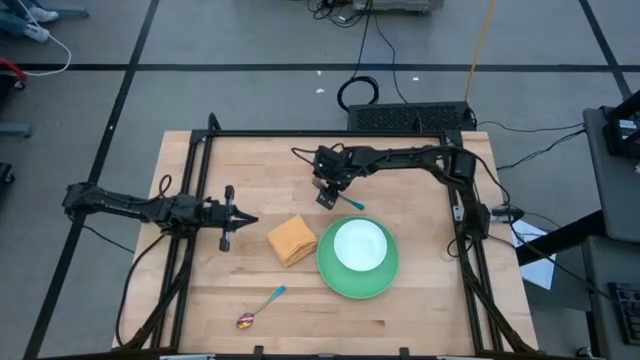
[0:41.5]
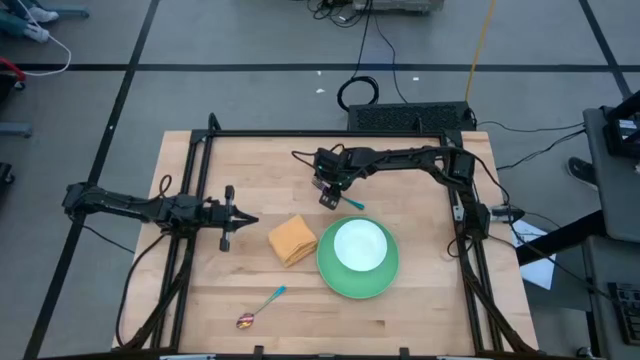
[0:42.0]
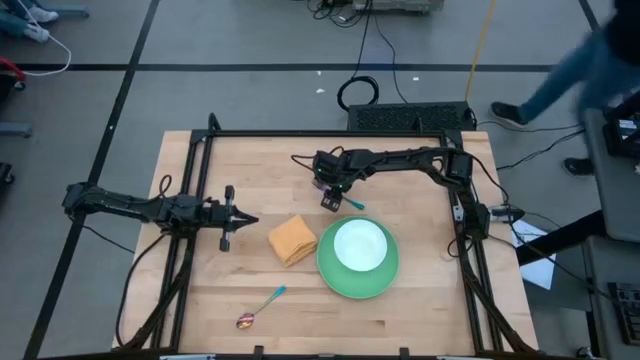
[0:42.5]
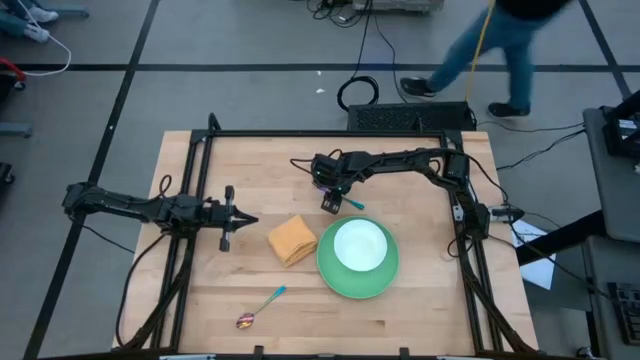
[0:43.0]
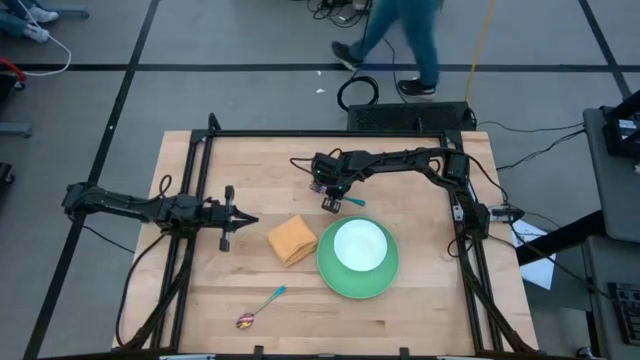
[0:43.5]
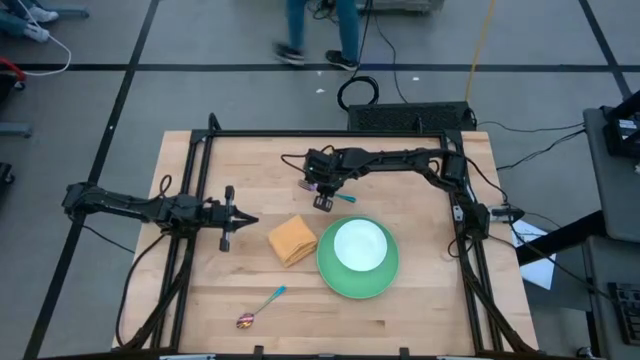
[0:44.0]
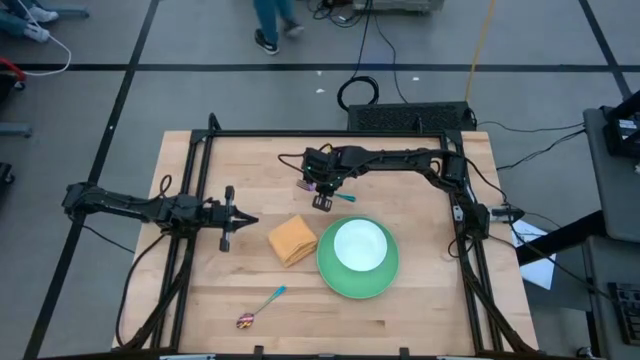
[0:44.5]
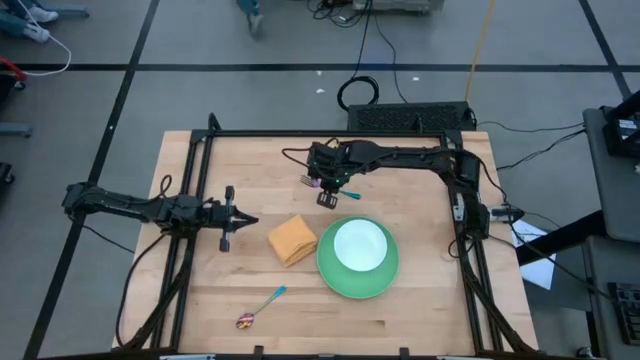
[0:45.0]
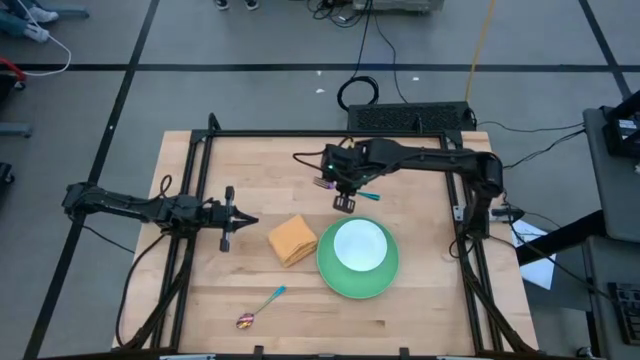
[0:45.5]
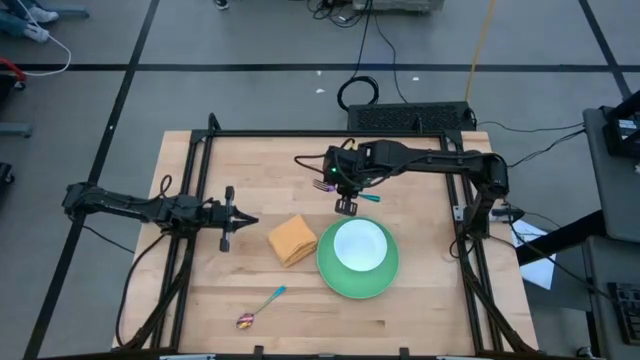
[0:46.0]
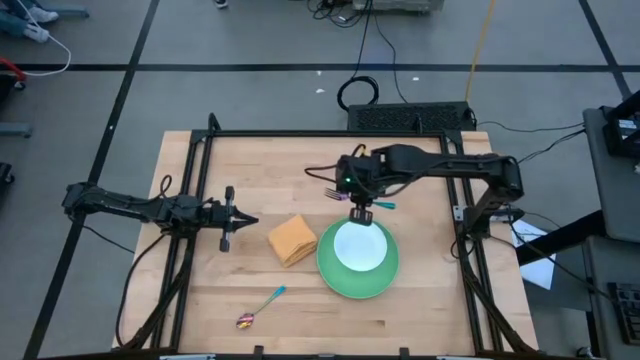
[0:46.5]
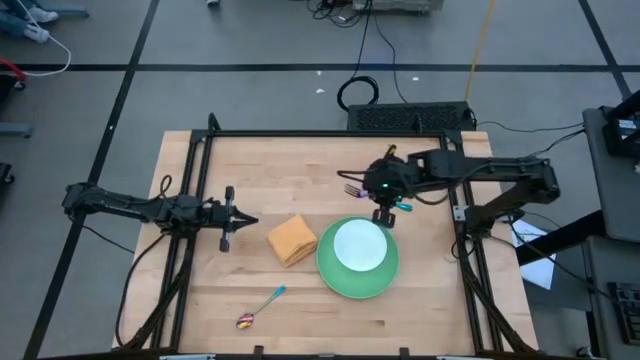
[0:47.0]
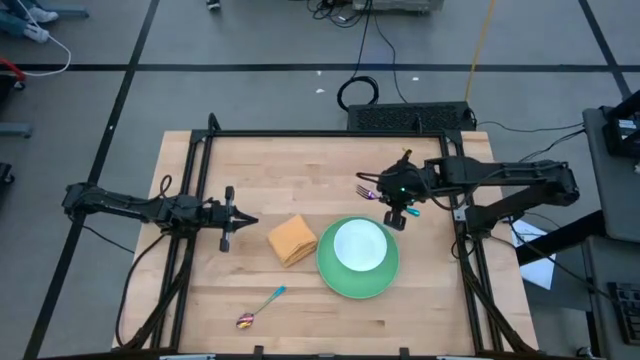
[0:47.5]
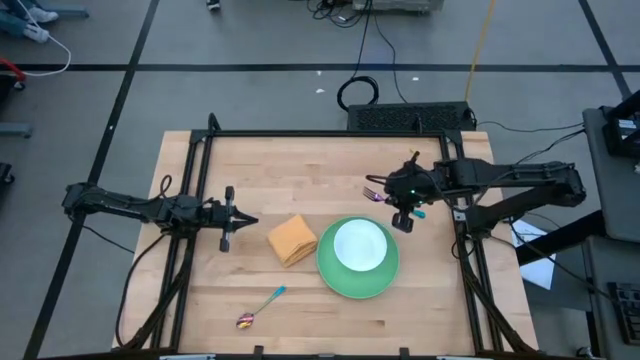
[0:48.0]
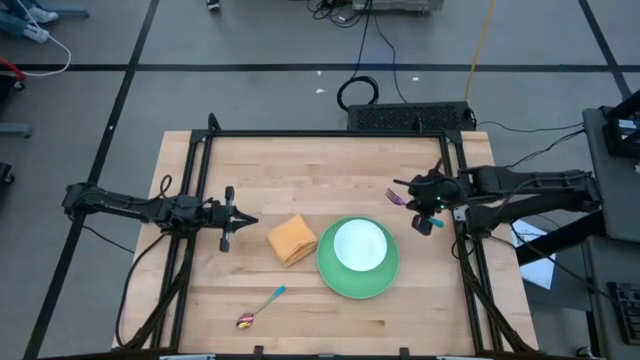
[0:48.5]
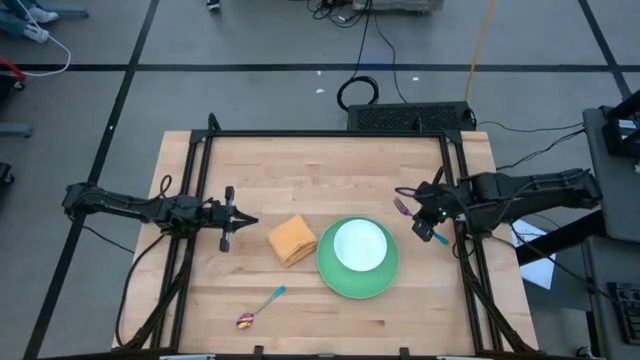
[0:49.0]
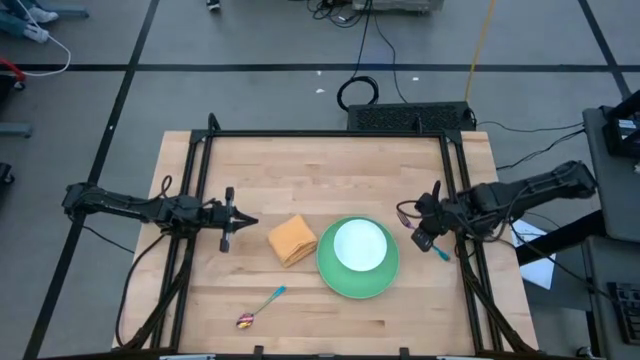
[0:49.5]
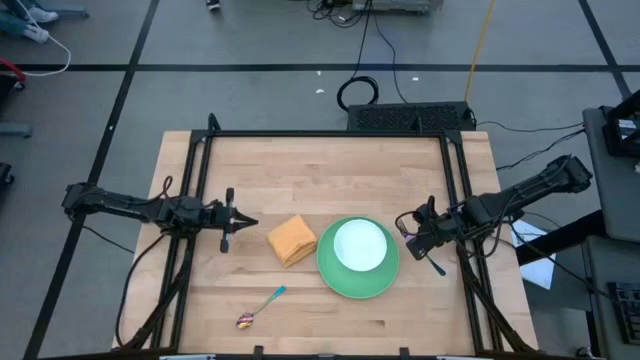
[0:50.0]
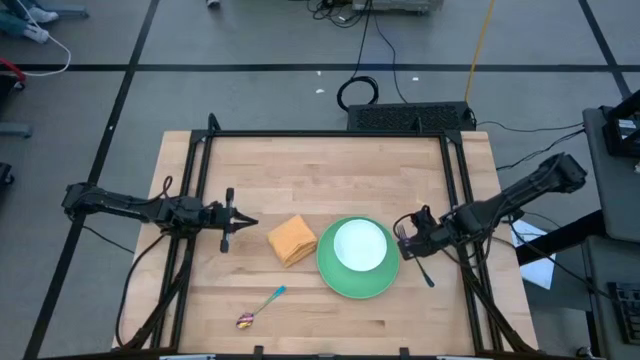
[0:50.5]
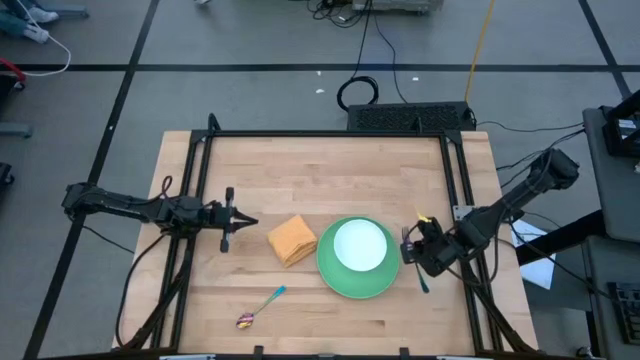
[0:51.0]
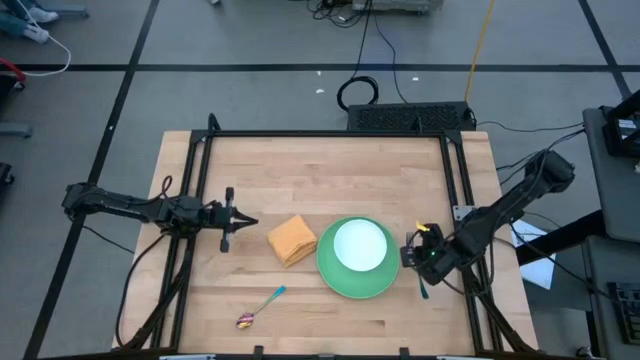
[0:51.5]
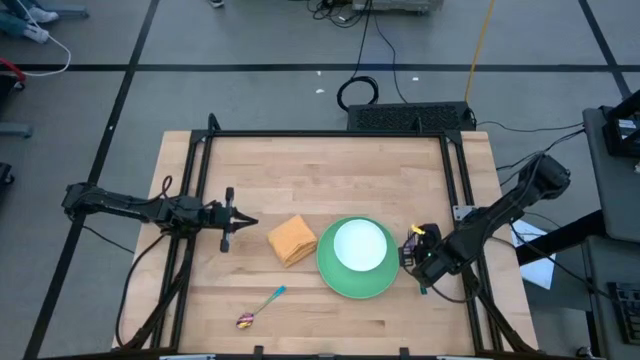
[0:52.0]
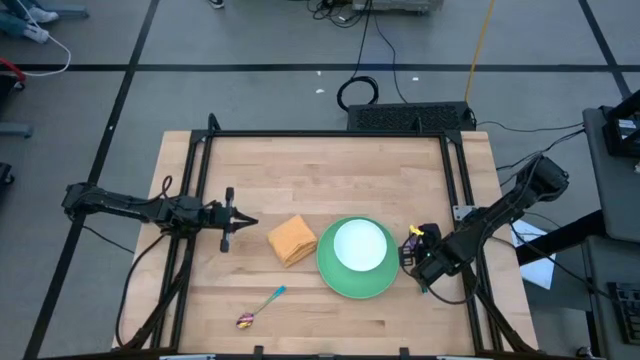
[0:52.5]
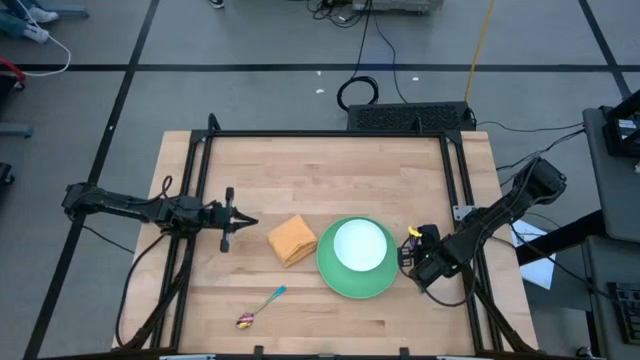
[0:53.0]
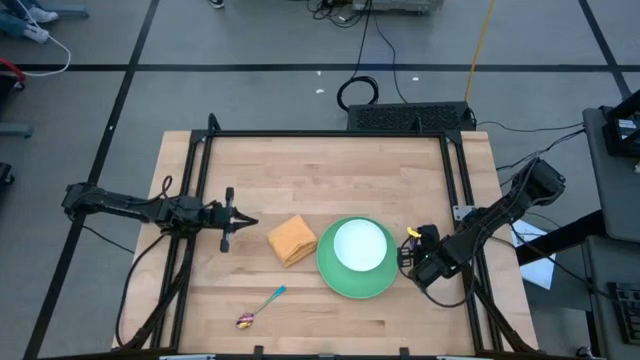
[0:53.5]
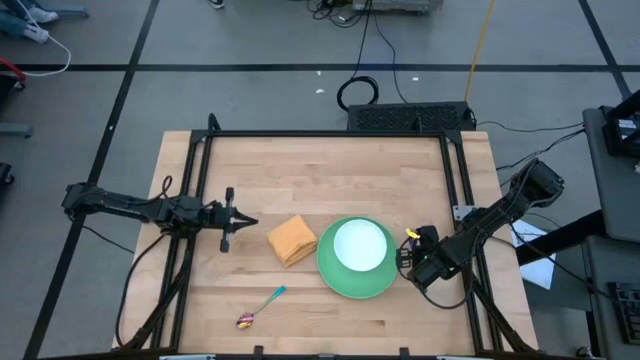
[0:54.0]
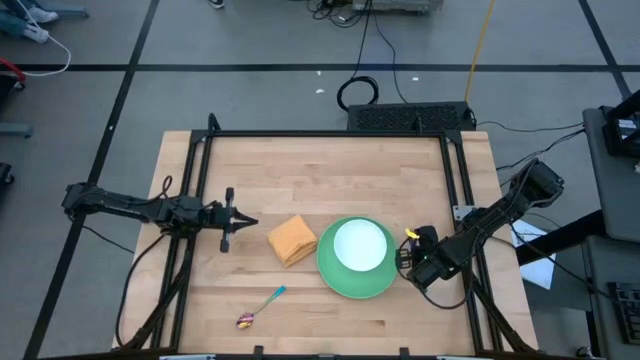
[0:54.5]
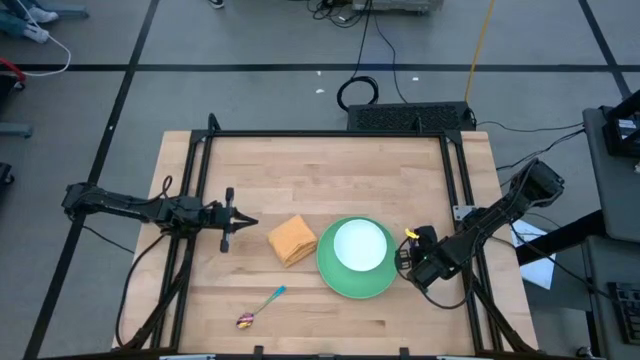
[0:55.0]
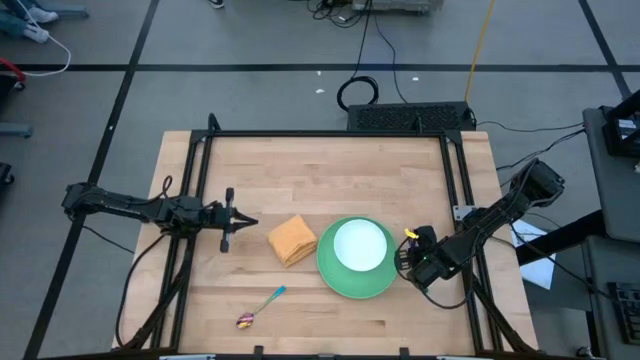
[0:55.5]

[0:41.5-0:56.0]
Task: Set table place
Put the purple fork to the right of the light green plate

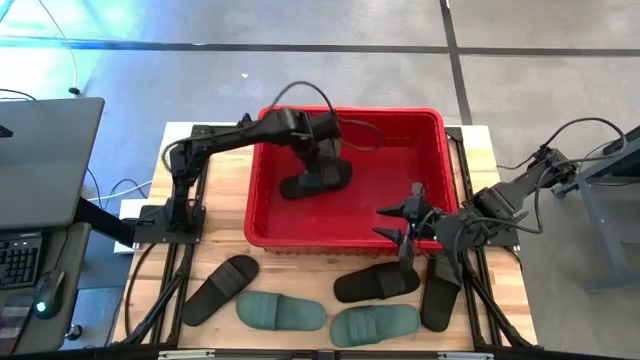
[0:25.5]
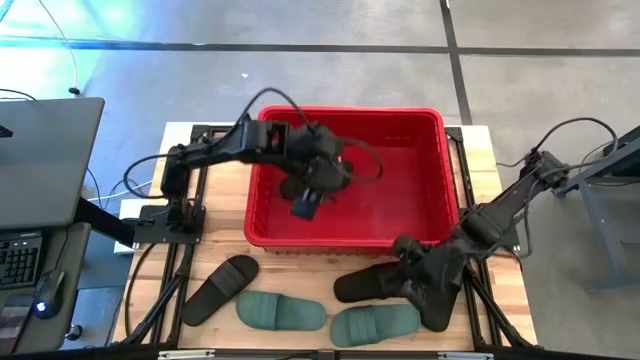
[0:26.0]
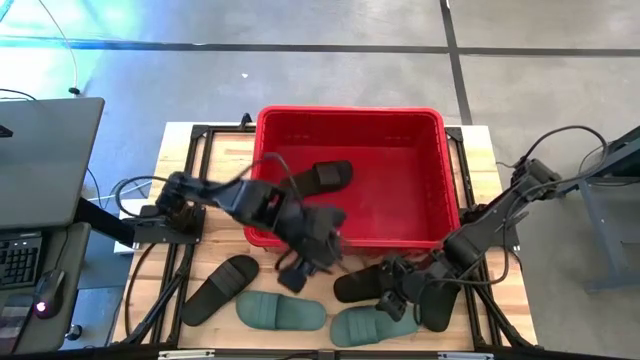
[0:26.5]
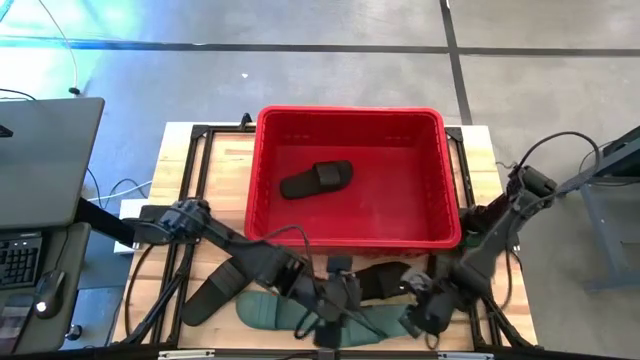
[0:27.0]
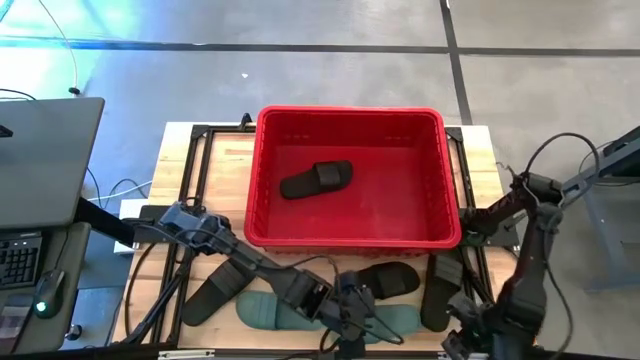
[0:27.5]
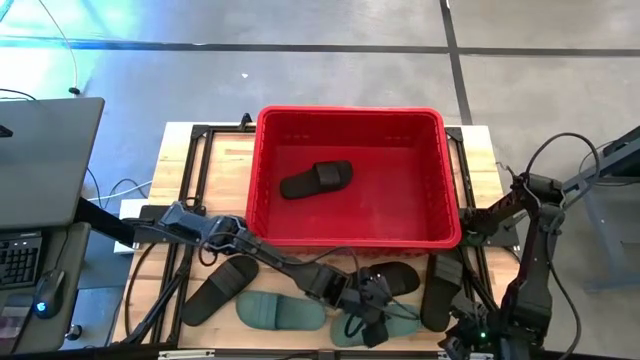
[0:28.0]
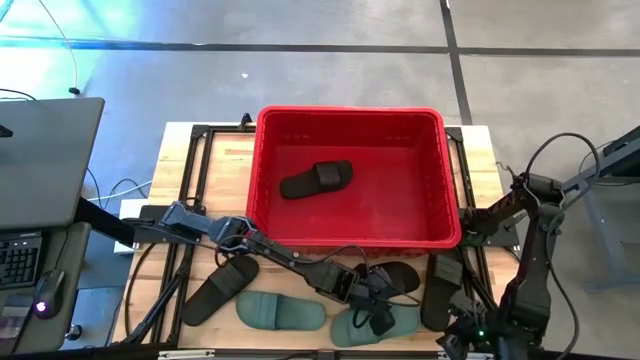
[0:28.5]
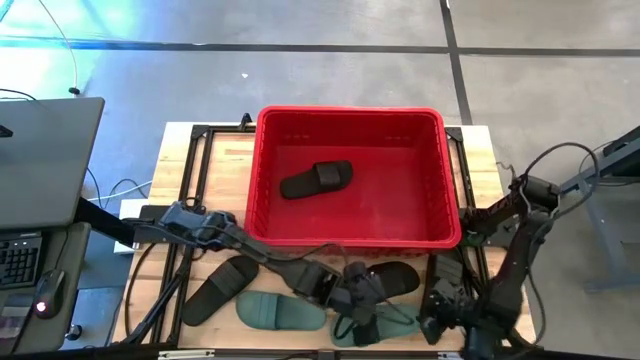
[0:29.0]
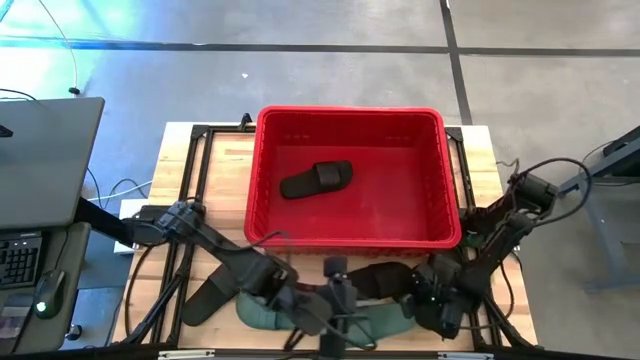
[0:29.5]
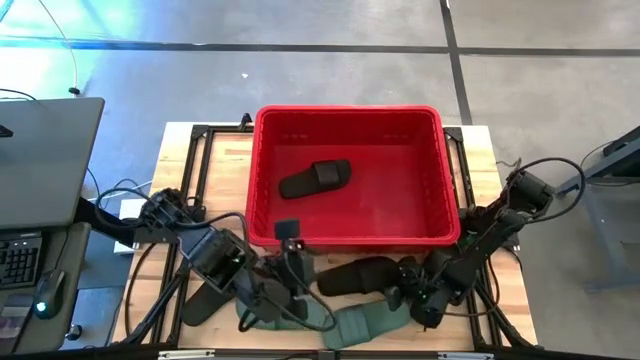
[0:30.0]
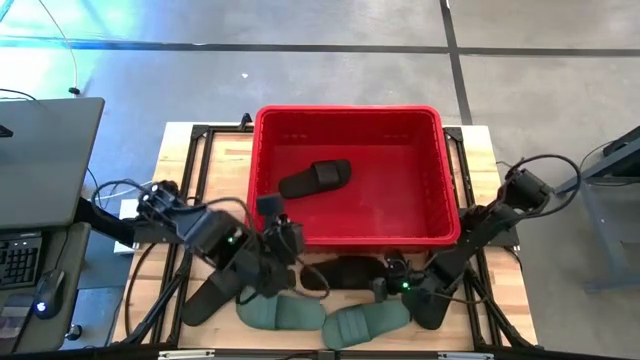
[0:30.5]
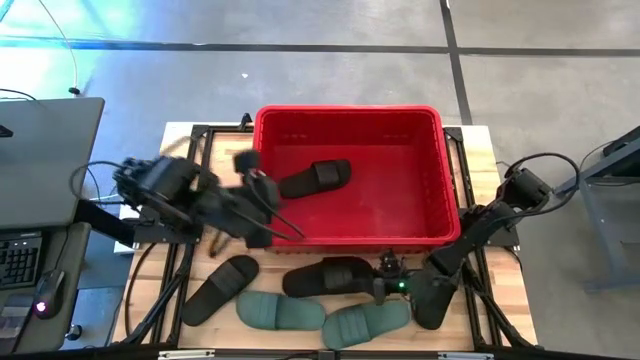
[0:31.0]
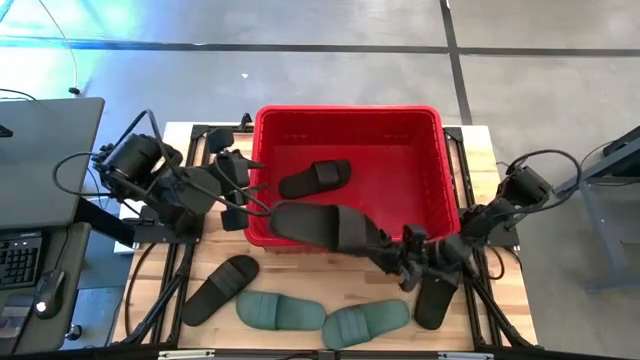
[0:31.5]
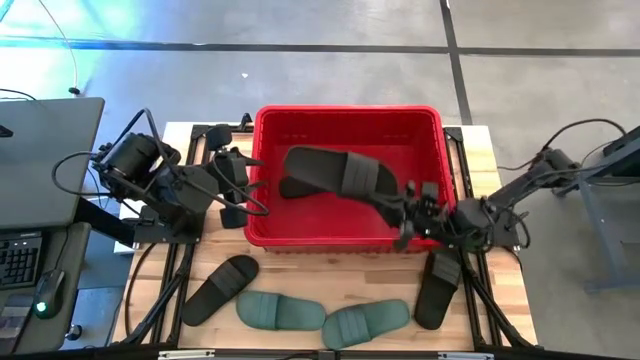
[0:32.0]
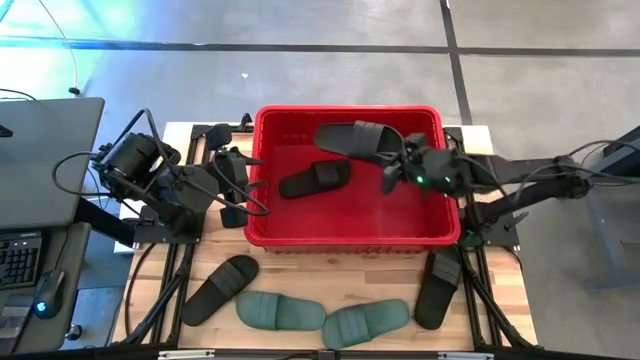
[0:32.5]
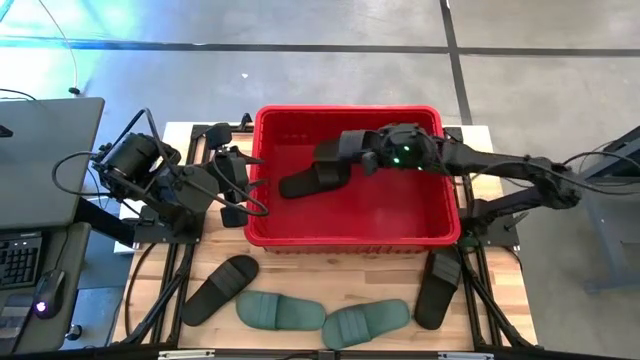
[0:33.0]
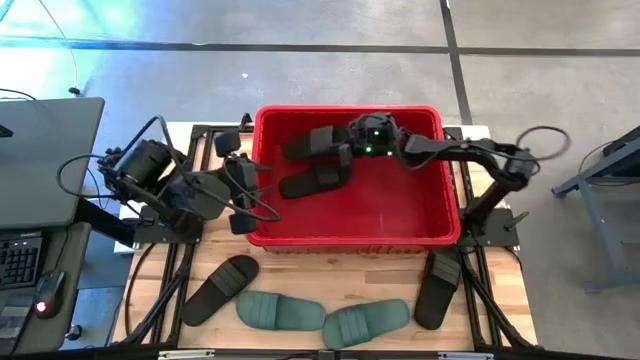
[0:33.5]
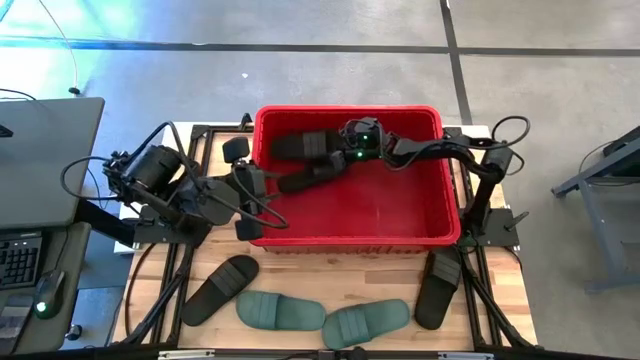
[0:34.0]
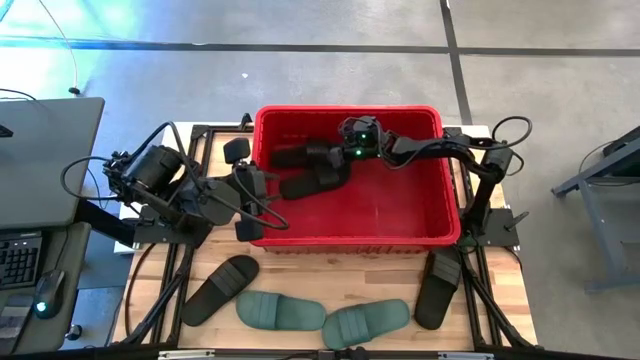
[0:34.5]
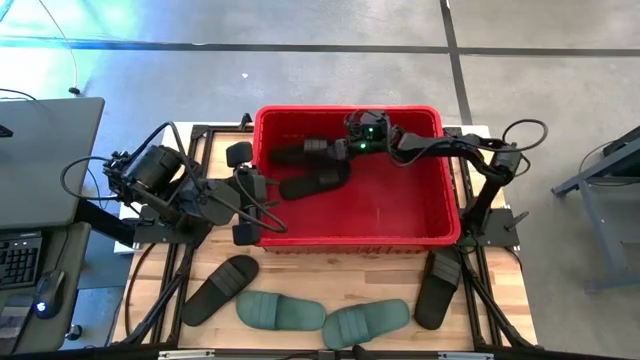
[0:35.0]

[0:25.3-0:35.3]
Task: Pick and place slides into bin
Put the black slide into the red bin
